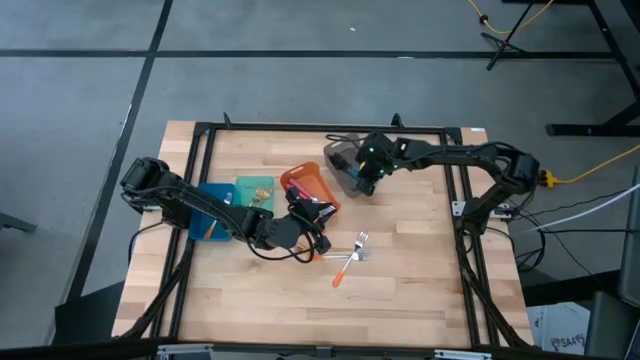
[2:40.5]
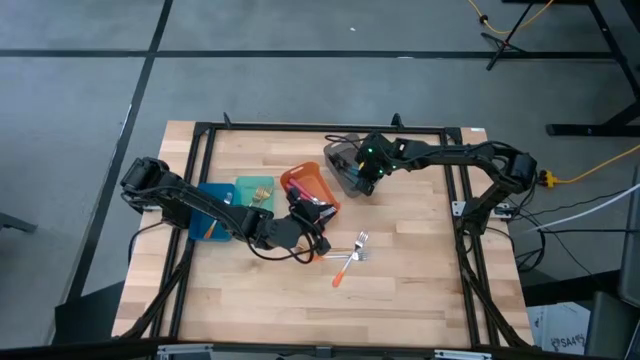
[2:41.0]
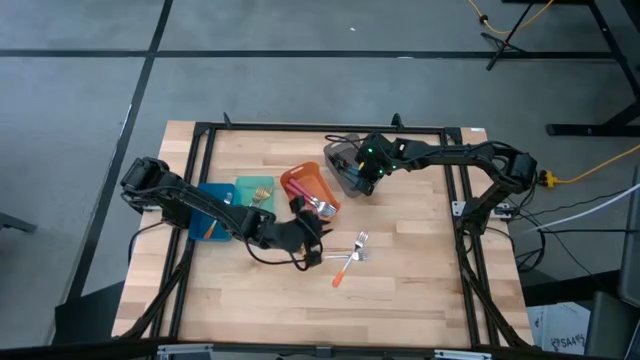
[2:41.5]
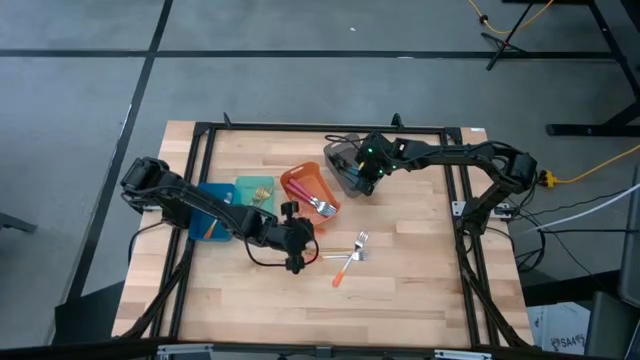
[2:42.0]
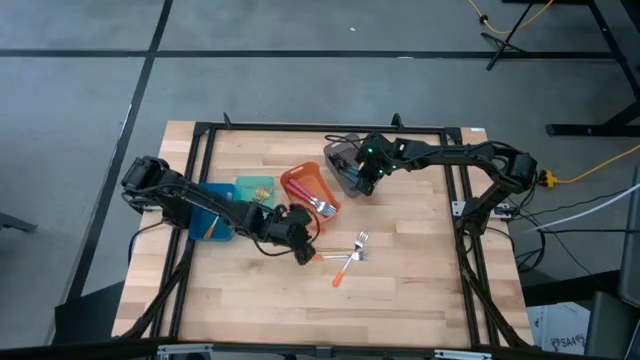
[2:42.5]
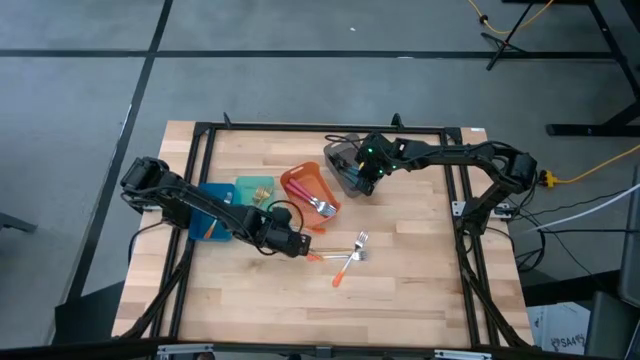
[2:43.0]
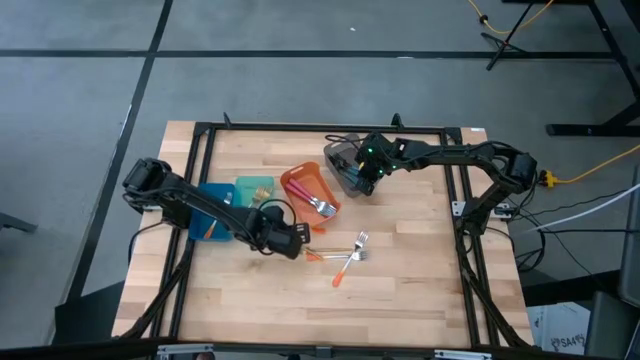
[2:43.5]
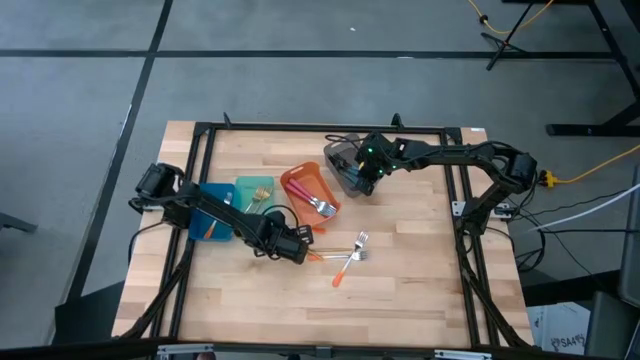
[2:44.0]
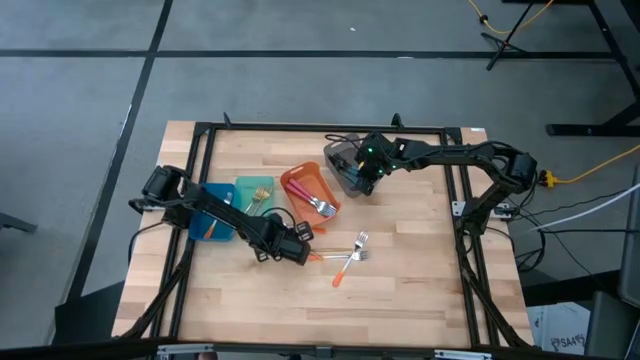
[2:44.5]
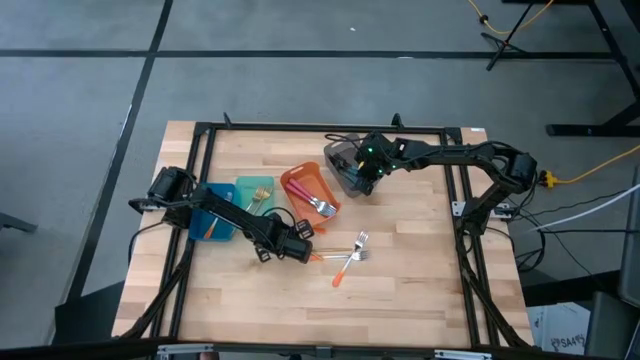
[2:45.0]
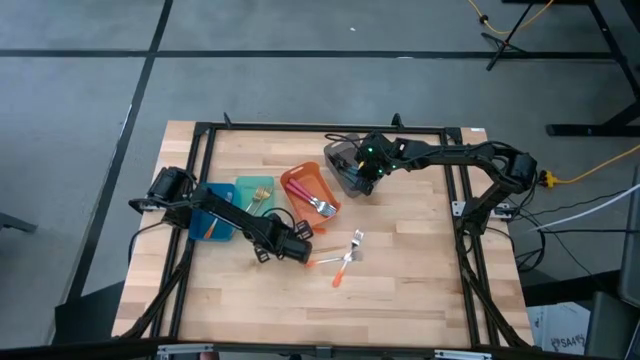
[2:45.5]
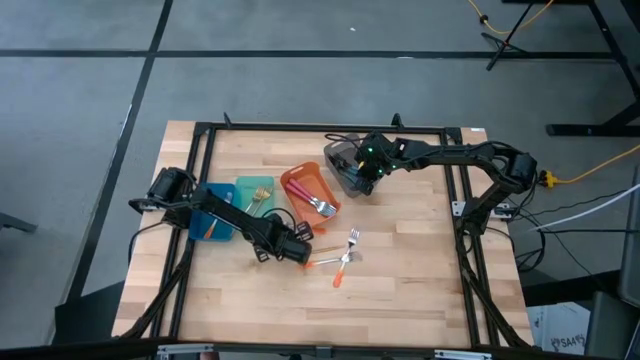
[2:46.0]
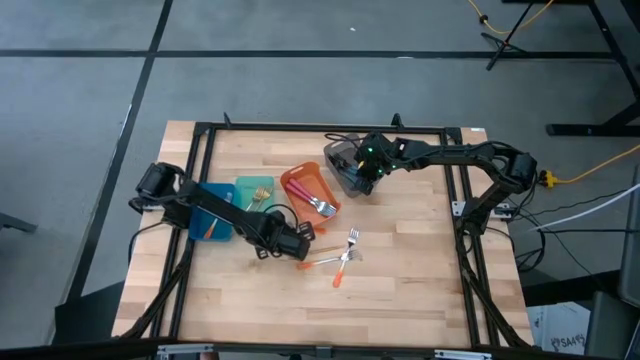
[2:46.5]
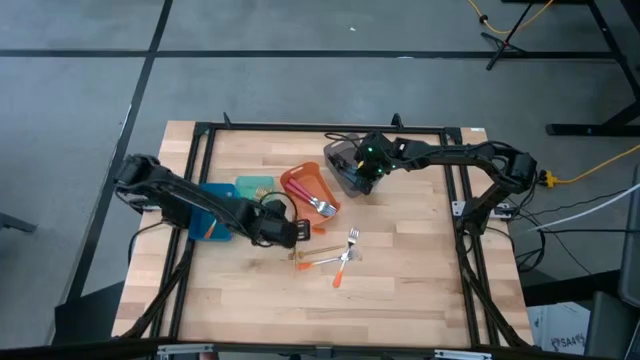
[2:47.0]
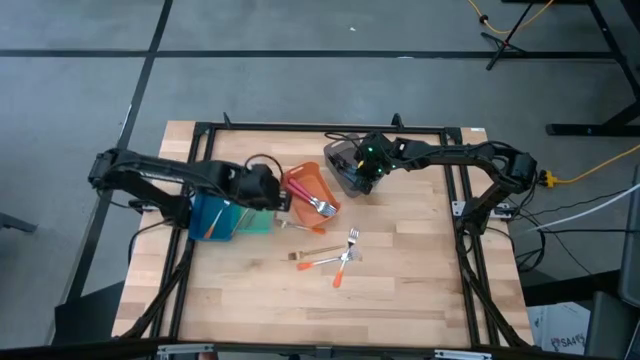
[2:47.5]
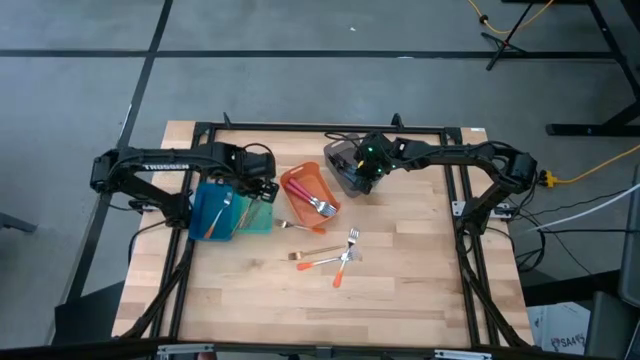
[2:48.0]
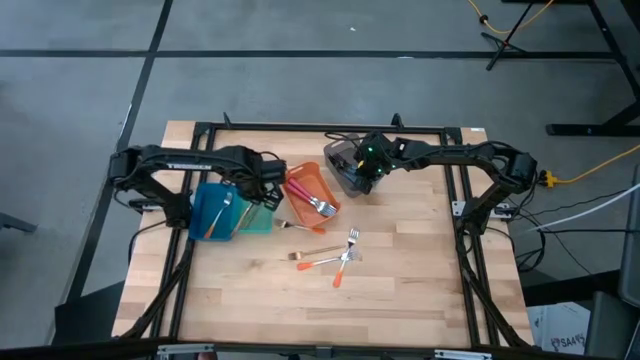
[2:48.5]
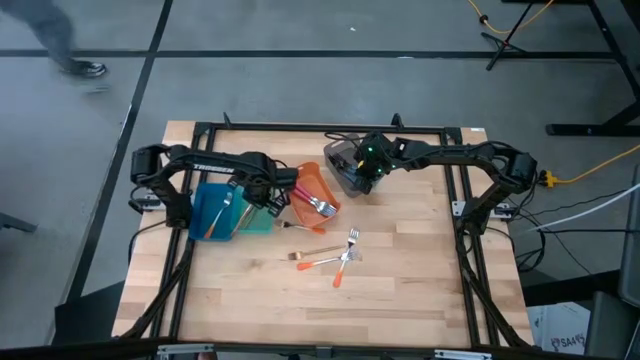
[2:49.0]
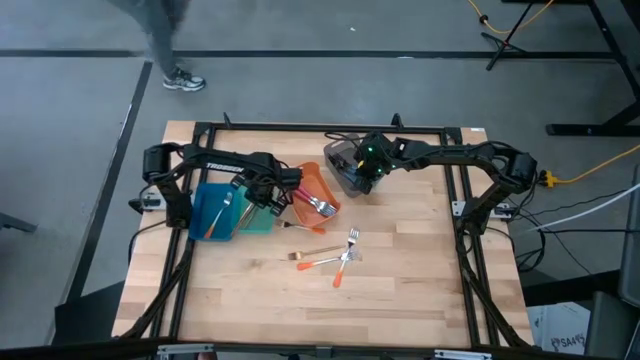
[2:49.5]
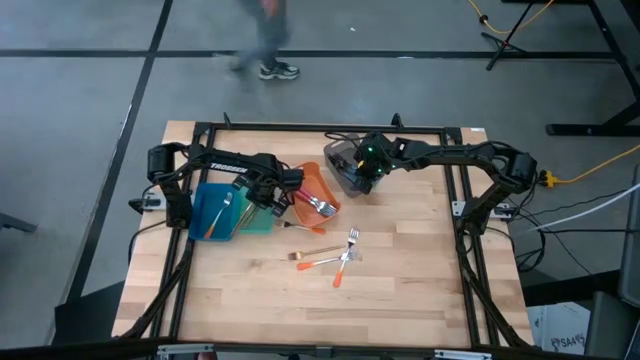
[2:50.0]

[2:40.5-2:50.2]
Task: Sort silverware by color (type)
Put the gold fork into the light blue bin

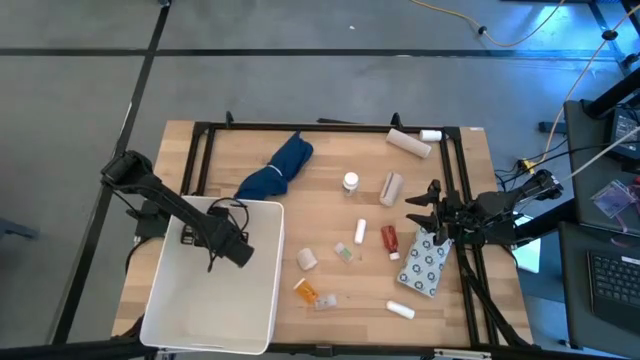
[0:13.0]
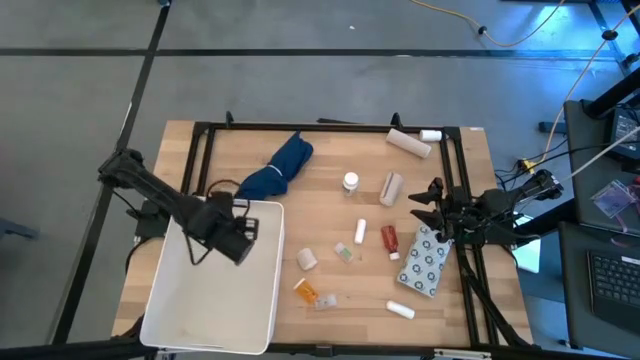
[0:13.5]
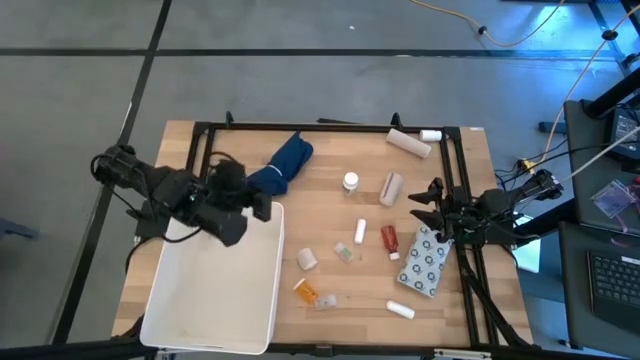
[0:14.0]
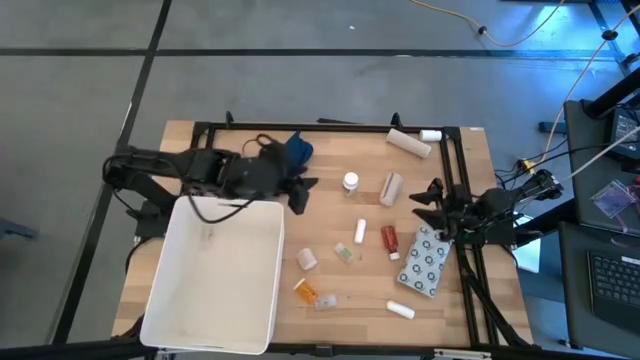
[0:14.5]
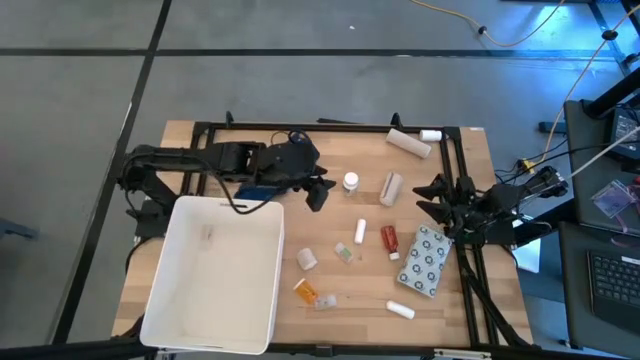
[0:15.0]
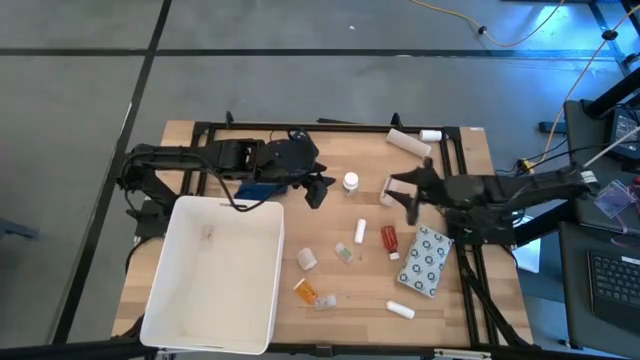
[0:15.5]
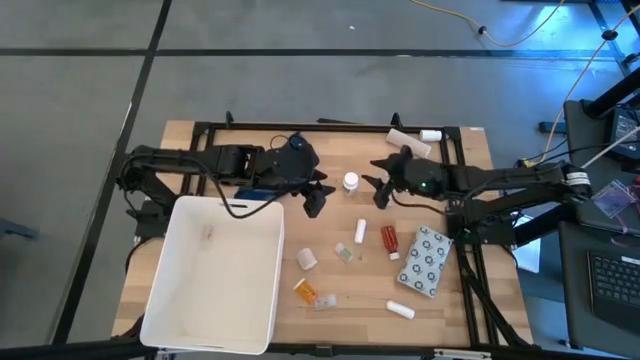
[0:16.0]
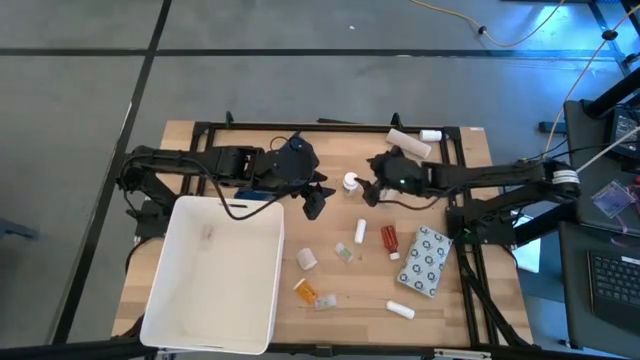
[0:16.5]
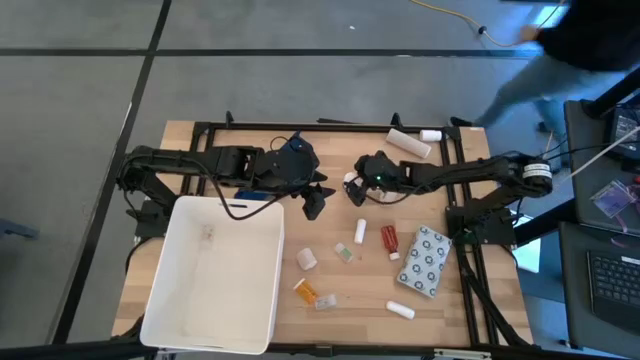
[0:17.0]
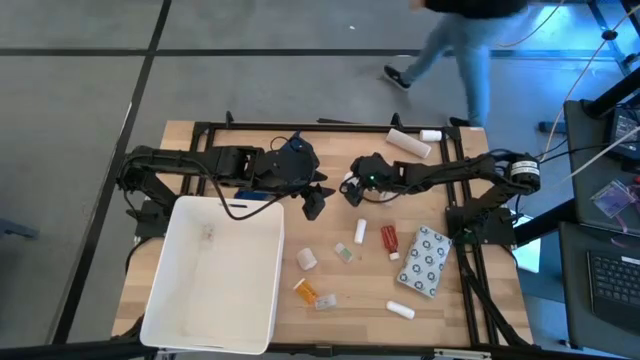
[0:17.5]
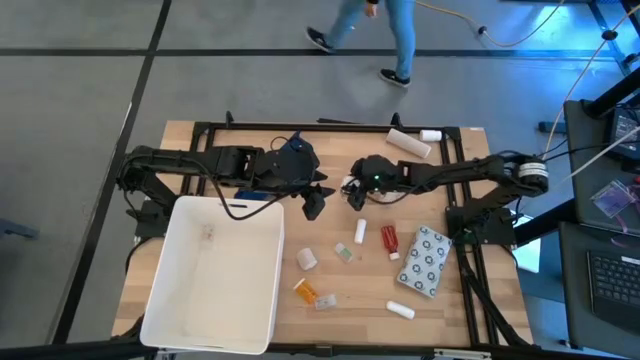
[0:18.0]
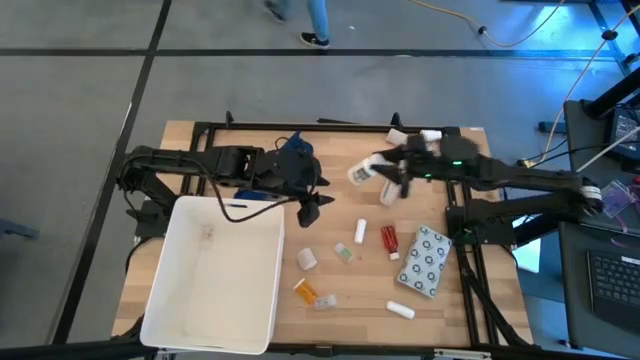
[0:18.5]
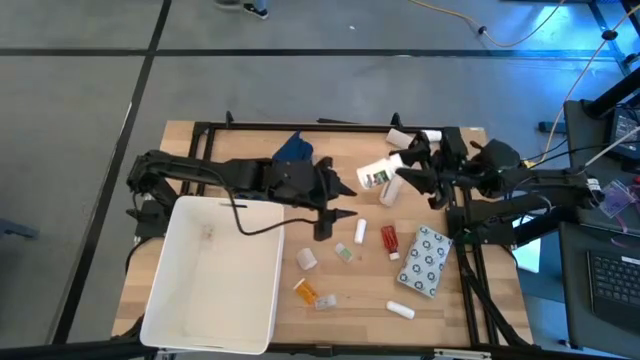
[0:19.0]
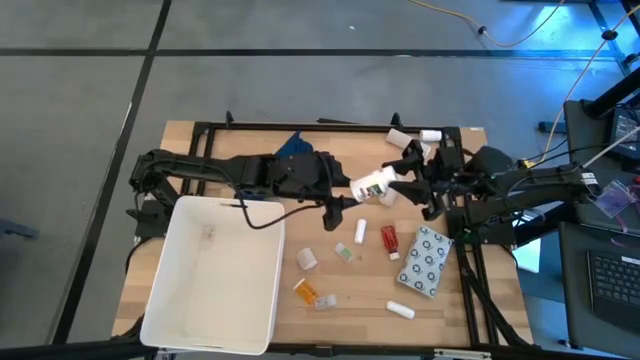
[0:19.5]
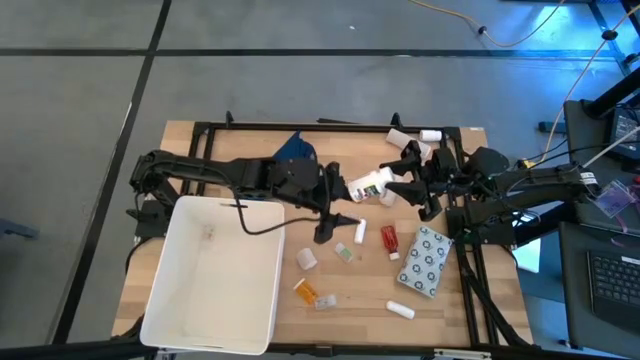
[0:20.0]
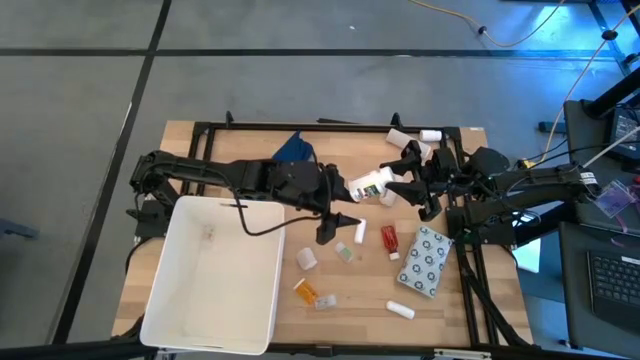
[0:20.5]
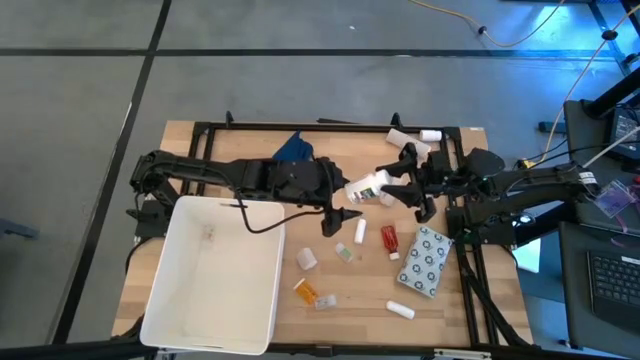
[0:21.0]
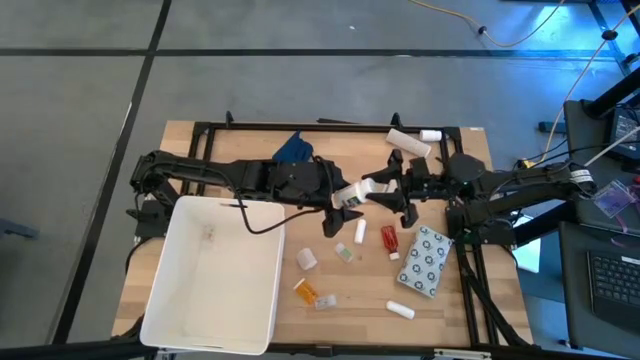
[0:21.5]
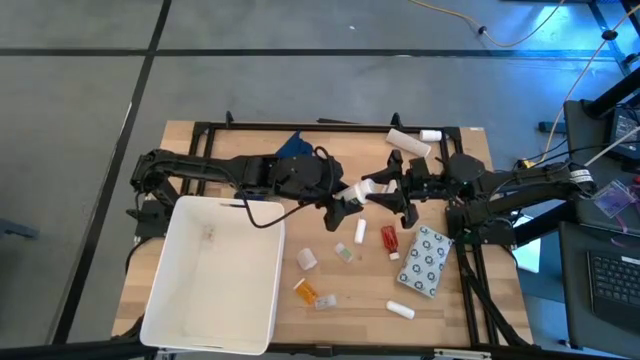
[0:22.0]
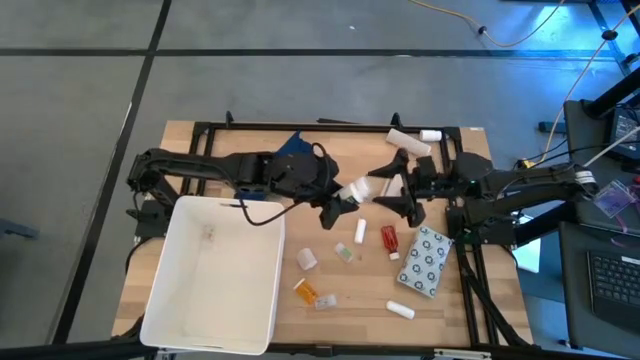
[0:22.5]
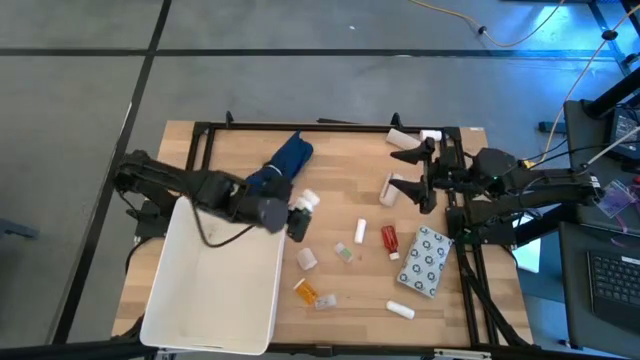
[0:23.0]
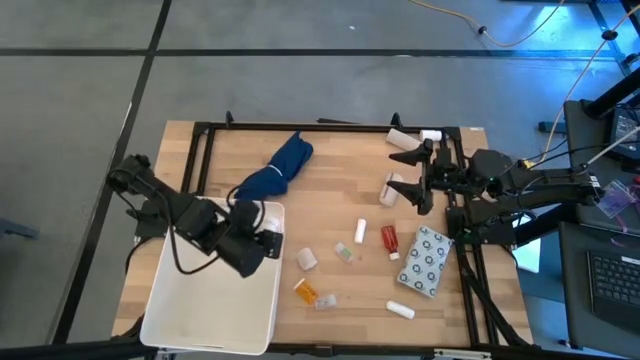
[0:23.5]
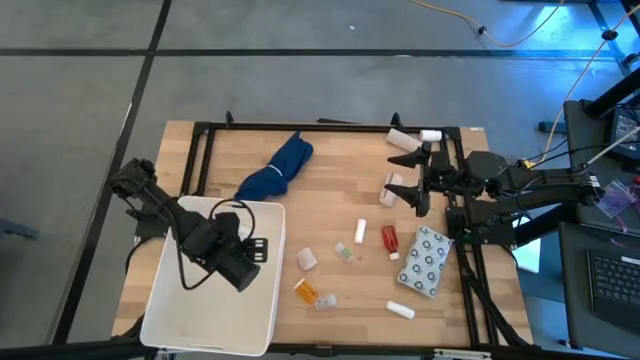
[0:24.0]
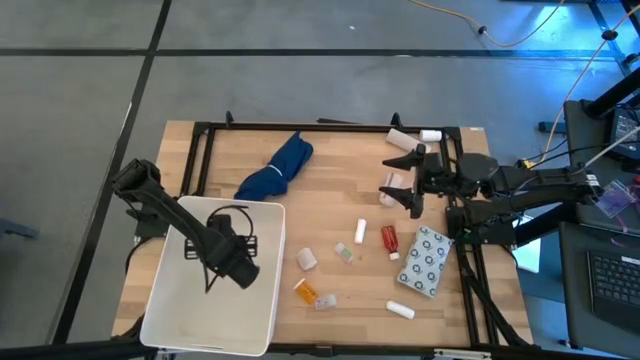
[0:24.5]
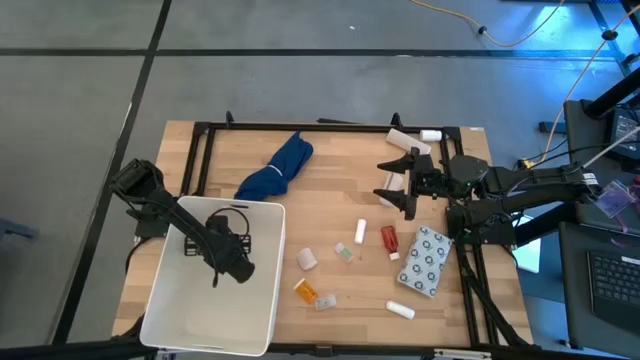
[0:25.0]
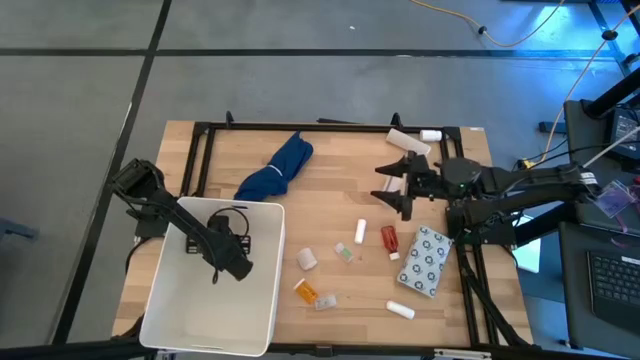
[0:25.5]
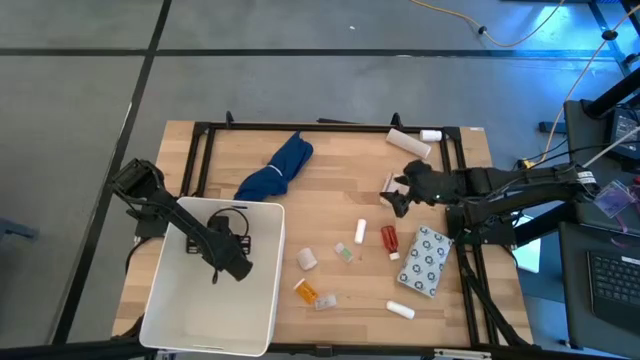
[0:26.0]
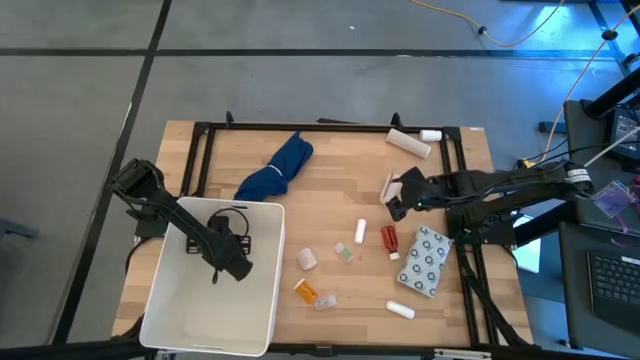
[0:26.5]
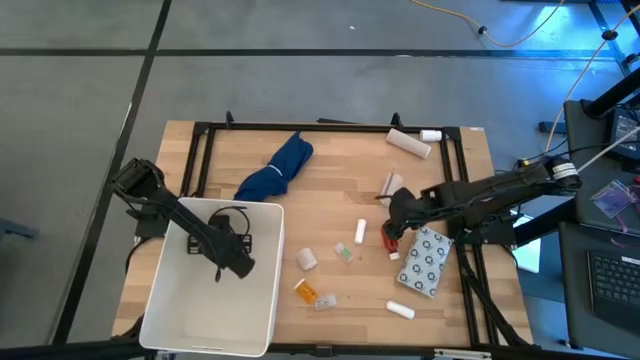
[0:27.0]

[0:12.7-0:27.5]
Task: Pick & place medical supplies in basket/bin
Put the white and green medicine bottle into the white bin
